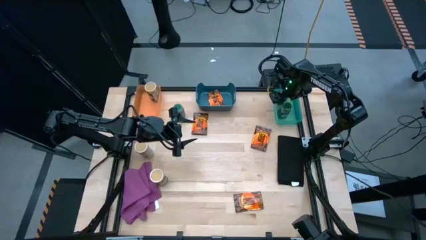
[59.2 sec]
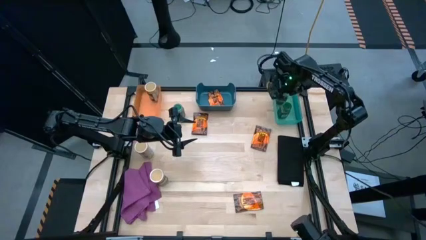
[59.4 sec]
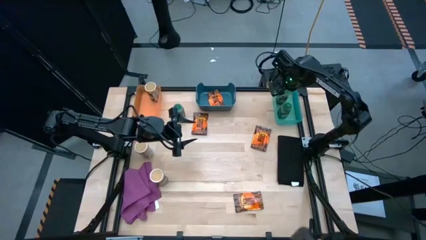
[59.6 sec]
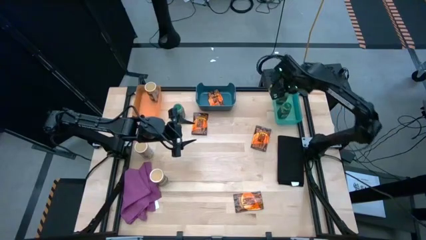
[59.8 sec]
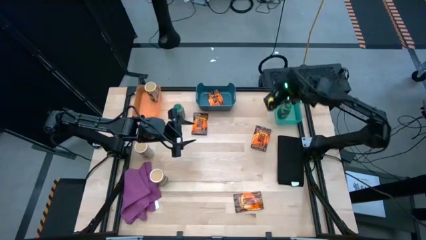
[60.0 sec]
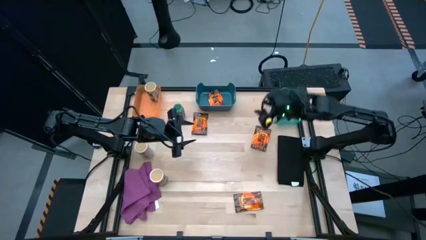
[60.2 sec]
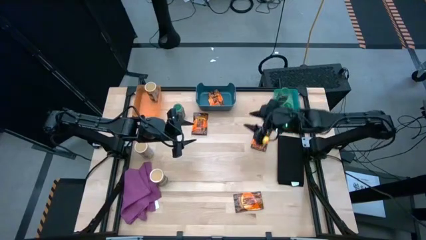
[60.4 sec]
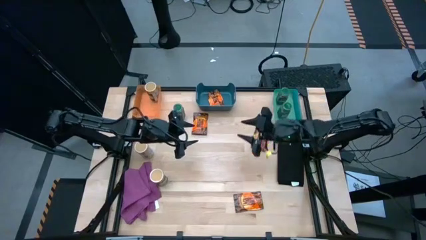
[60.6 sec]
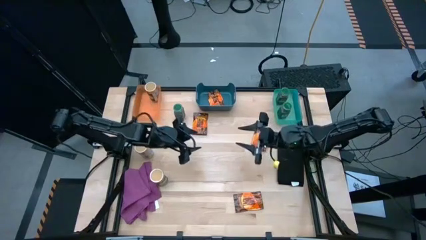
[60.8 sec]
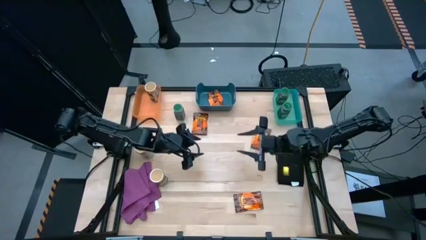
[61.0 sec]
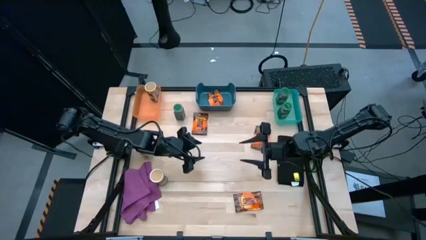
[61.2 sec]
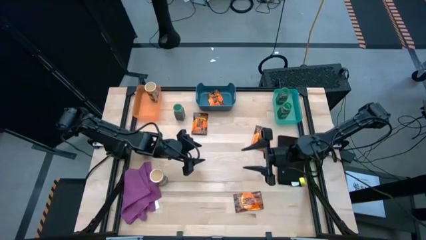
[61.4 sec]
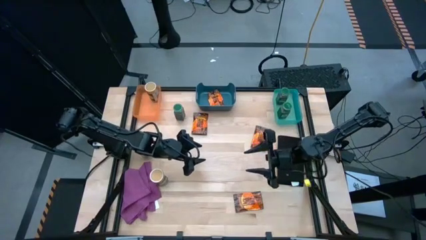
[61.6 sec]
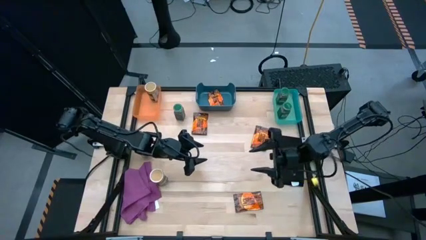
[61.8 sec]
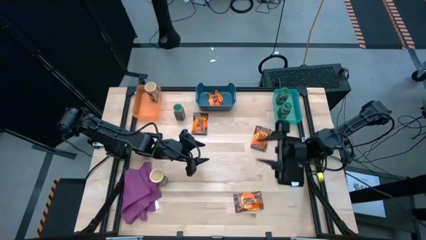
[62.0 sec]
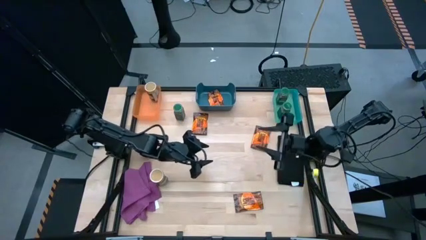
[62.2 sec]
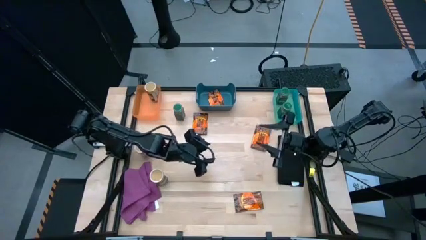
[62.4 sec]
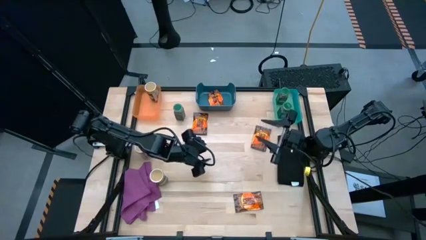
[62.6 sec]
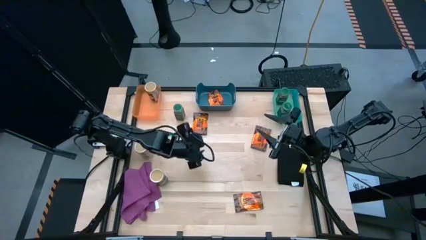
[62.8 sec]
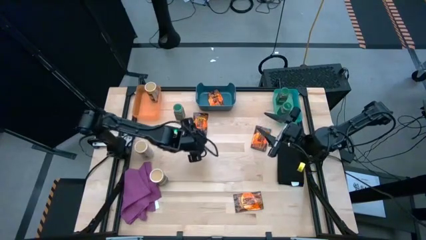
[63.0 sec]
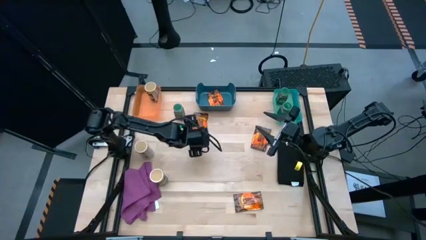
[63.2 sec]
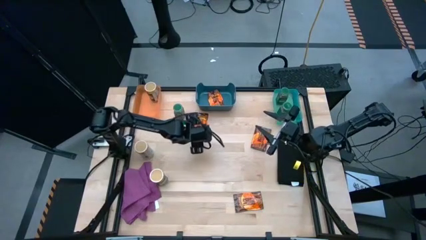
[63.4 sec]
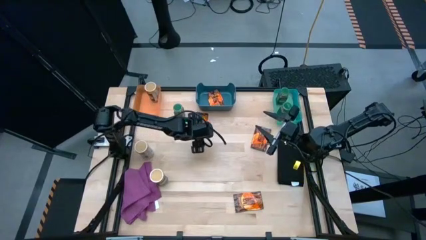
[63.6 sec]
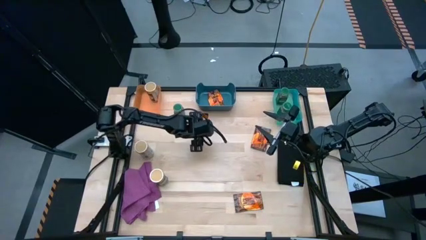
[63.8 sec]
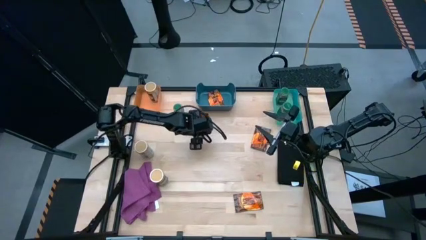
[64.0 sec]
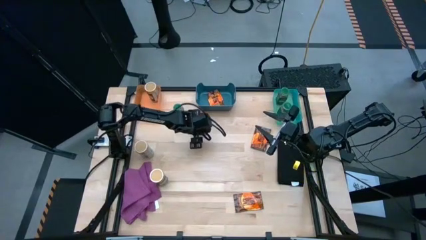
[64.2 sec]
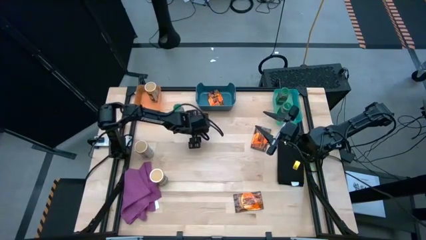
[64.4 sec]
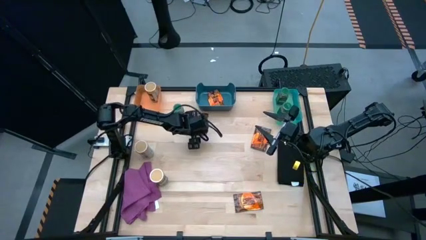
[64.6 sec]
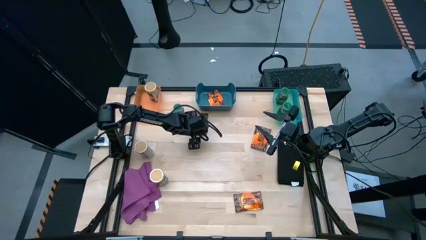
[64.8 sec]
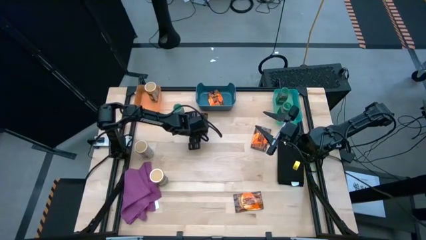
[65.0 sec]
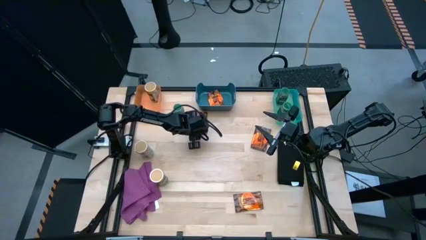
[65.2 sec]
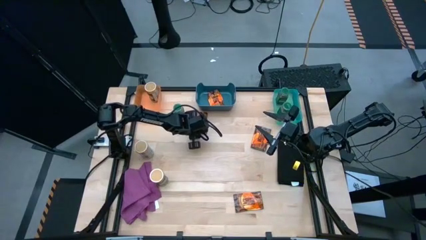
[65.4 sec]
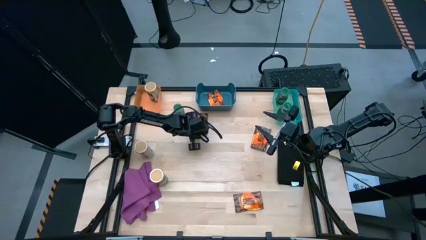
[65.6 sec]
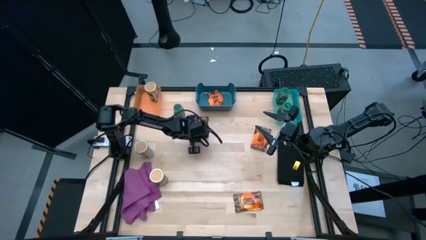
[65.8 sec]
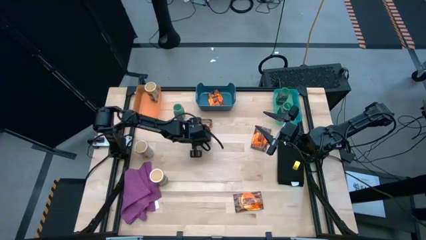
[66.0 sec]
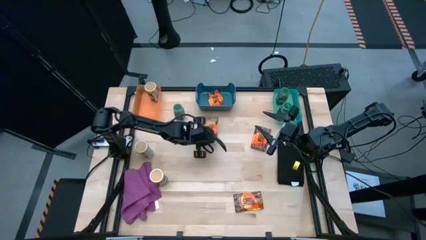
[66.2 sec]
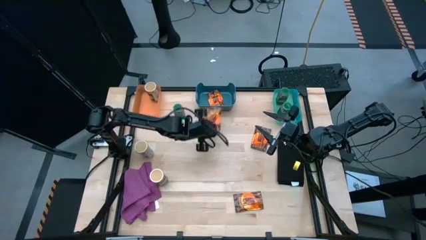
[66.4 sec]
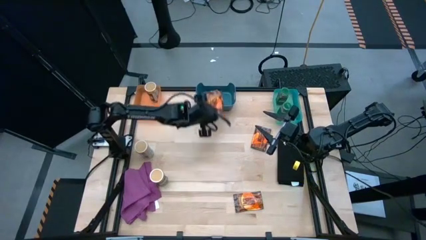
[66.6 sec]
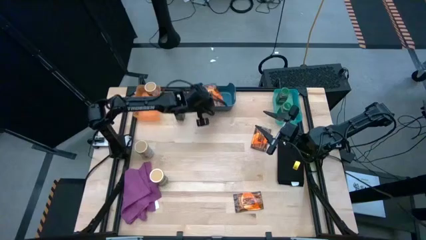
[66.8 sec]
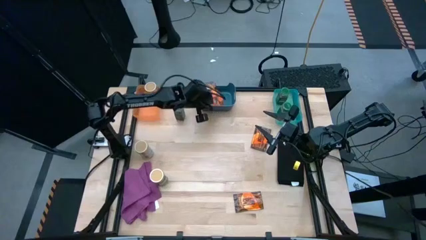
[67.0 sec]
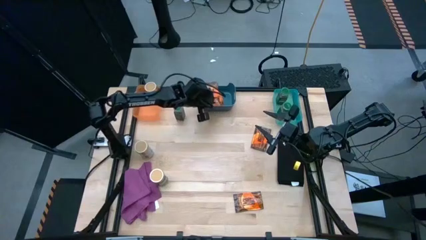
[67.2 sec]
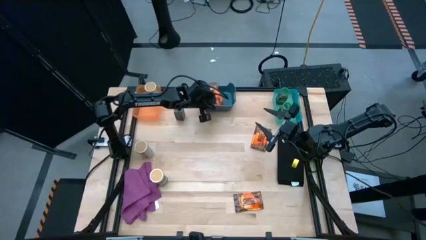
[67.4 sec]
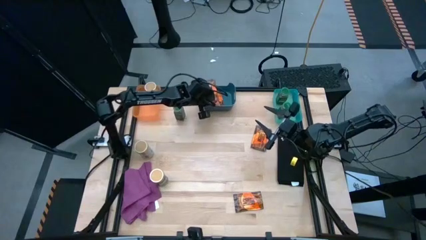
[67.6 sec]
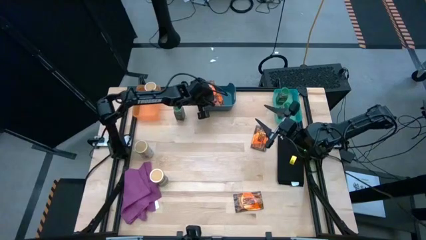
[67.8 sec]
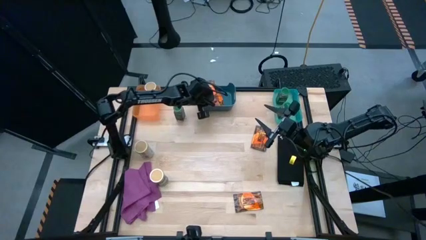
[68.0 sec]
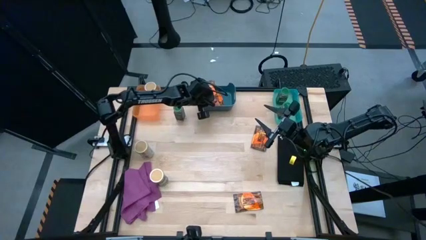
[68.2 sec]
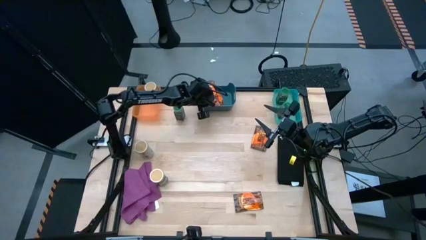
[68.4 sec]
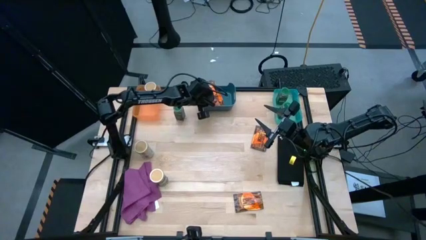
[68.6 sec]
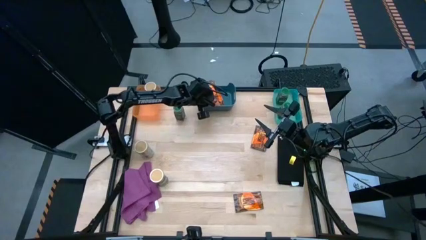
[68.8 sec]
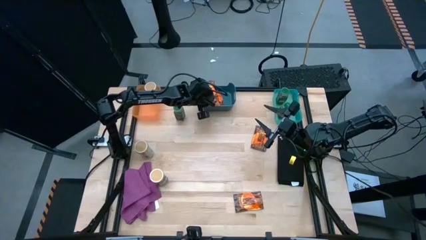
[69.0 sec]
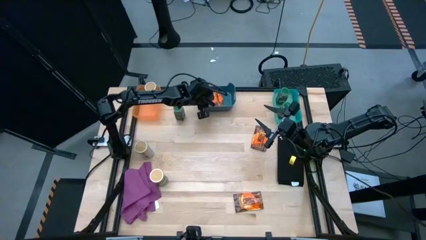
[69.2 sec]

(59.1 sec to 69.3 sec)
Task: Sort spices by type
Put the top left orange seasoning into the dark blue bin

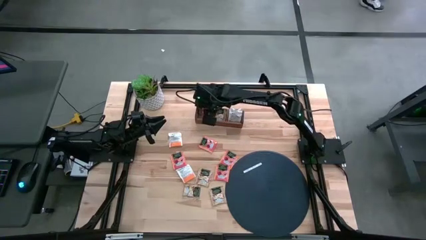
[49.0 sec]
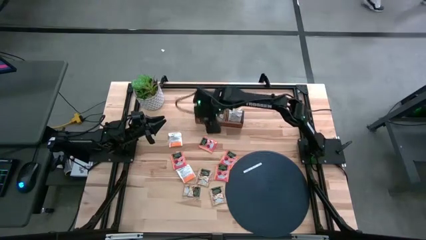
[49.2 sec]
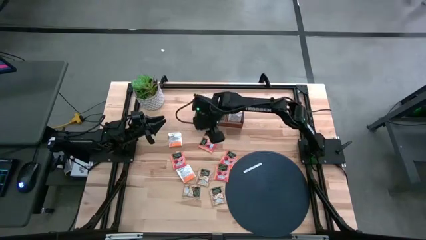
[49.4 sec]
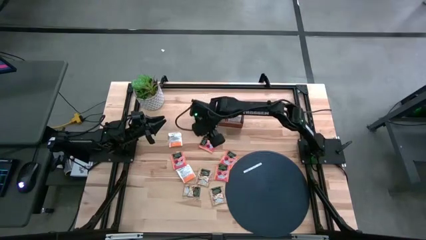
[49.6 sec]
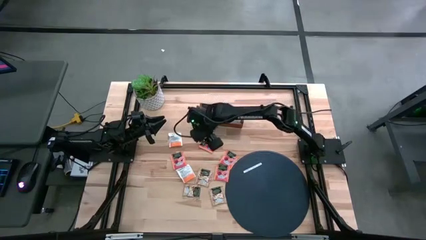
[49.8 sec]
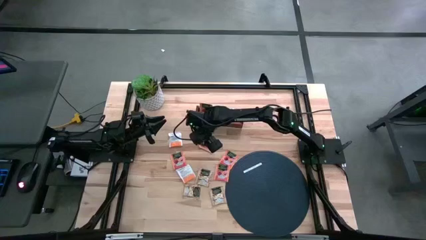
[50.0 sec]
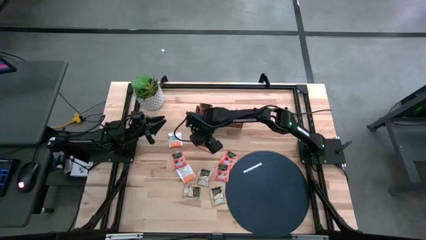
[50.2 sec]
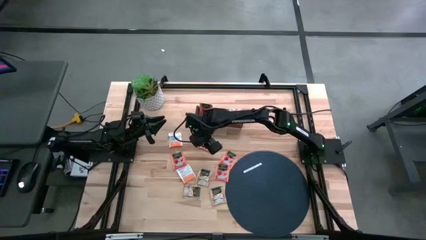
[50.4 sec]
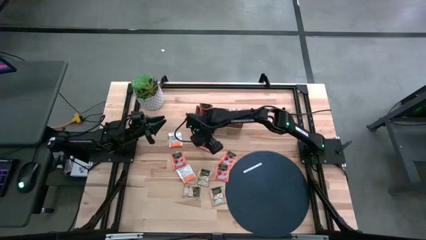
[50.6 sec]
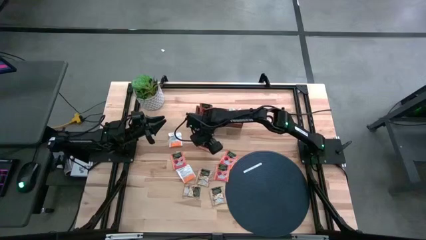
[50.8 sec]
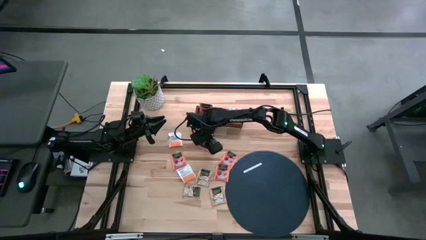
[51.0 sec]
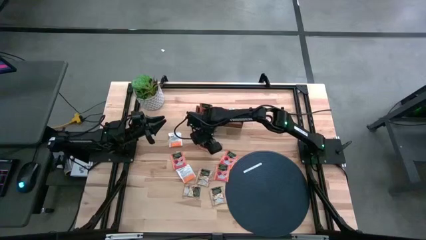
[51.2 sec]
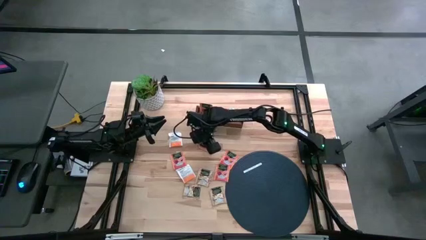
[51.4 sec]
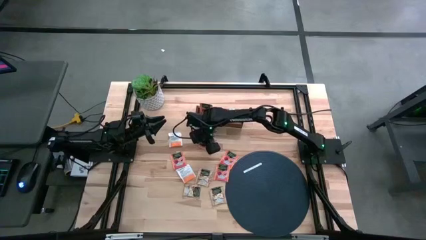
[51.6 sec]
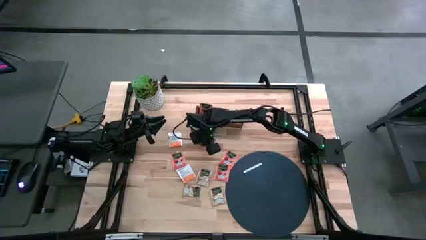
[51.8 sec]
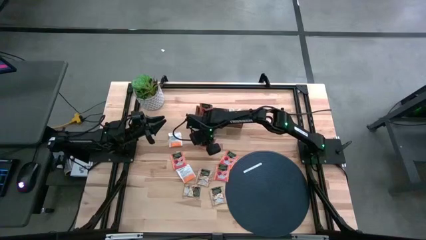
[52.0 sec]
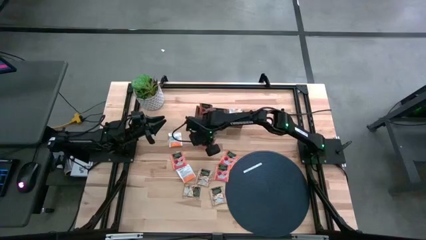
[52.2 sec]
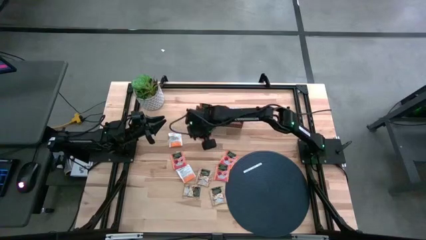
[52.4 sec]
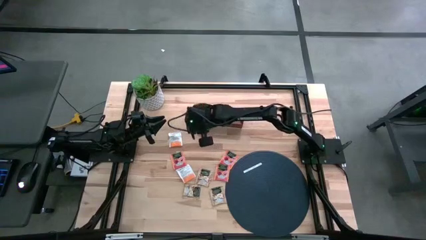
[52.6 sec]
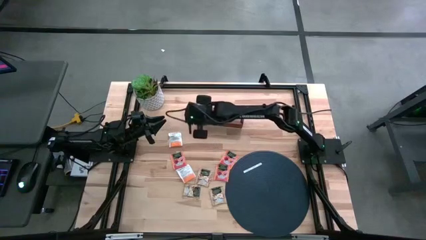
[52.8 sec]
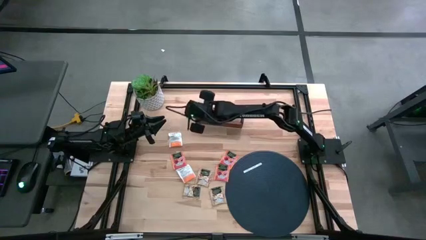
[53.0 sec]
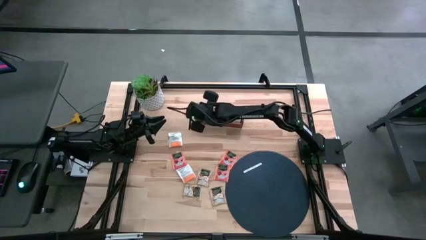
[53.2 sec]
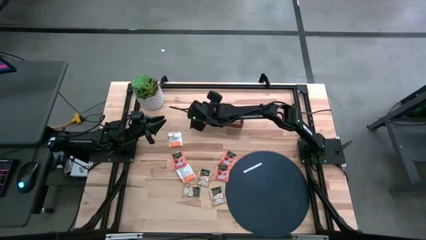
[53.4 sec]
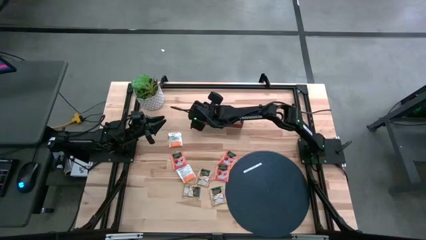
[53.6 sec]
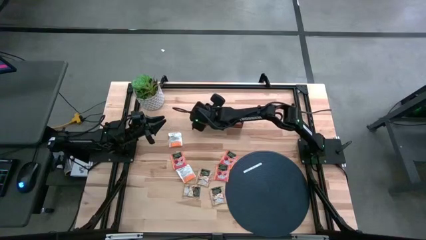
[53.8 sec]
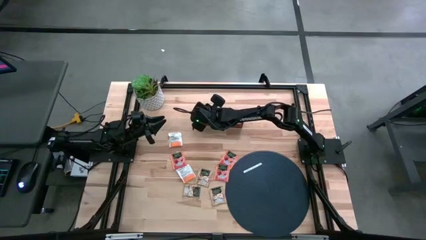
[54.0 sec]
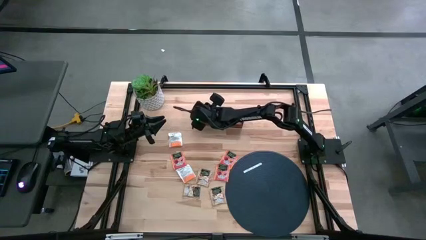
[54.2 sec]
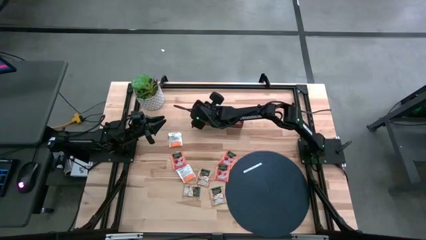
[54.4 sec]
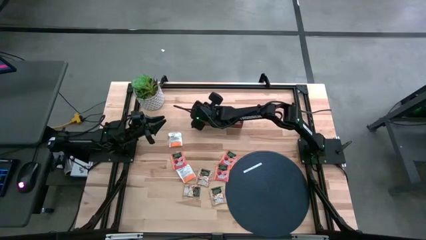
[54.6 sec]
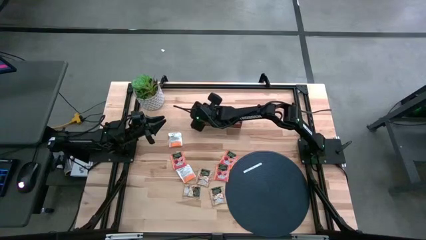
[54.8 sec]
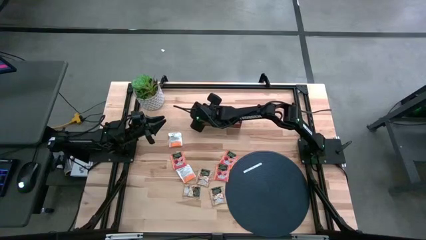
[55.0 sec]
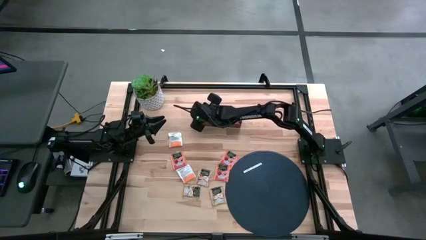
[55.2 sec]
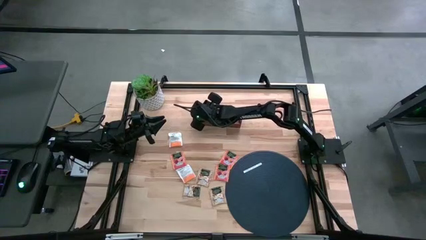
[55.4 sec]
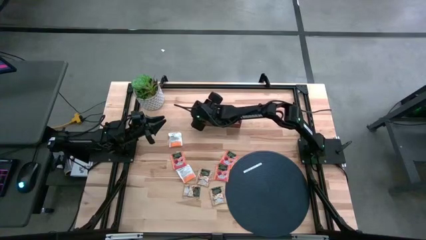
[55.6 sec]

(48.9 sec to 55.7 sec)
Task: Pick & Place Tea
Put the red orange tea sachet into the left section of the wooden organizer
